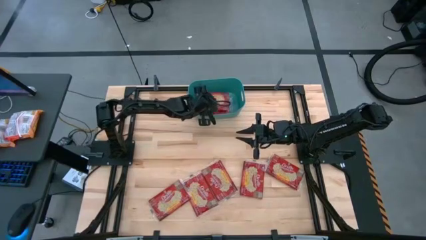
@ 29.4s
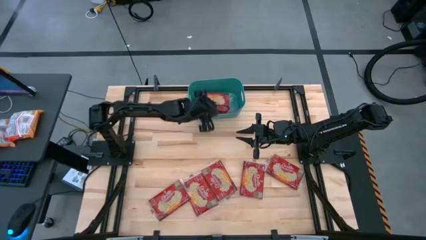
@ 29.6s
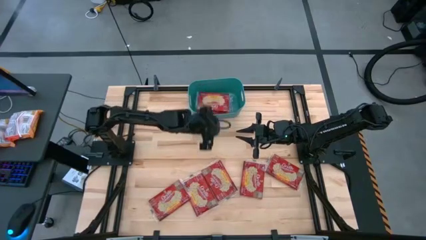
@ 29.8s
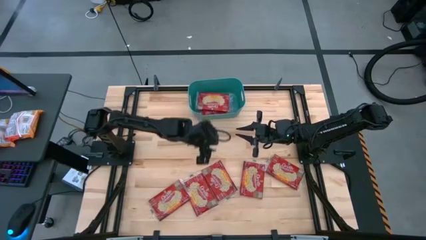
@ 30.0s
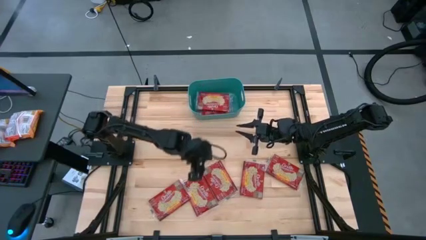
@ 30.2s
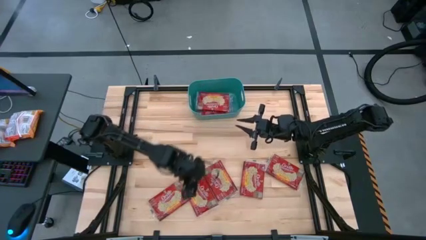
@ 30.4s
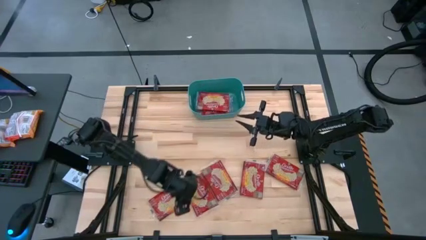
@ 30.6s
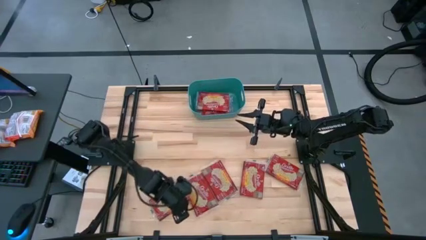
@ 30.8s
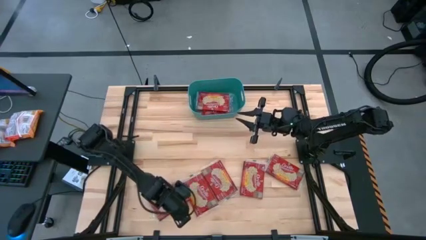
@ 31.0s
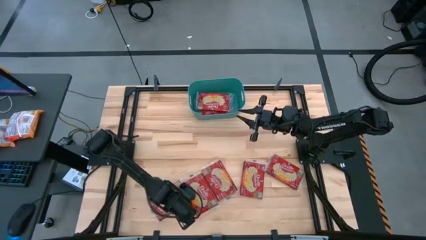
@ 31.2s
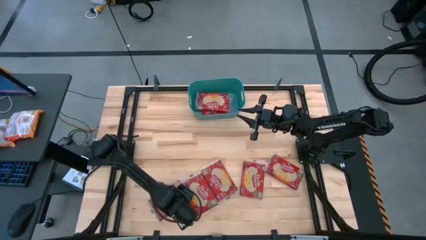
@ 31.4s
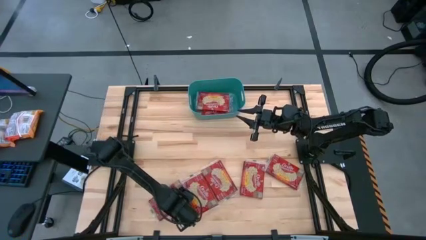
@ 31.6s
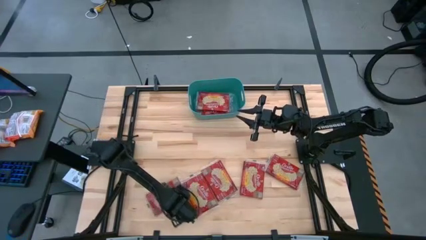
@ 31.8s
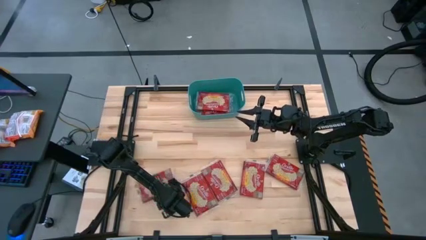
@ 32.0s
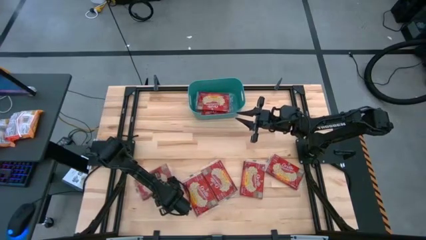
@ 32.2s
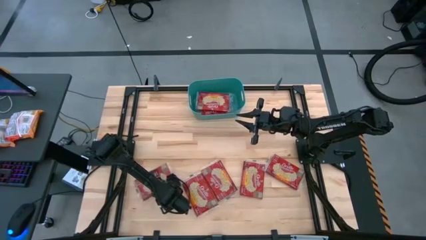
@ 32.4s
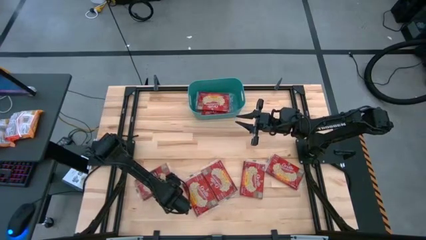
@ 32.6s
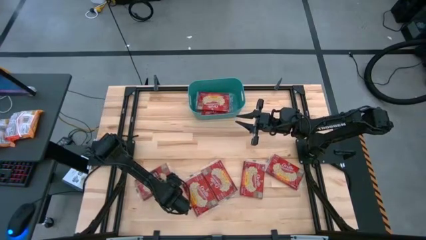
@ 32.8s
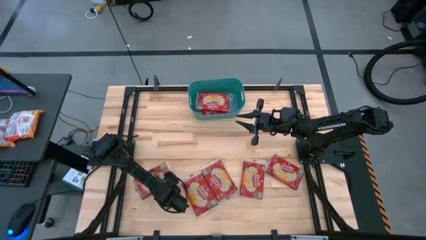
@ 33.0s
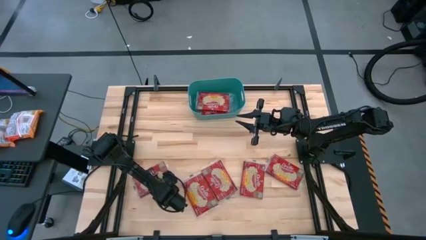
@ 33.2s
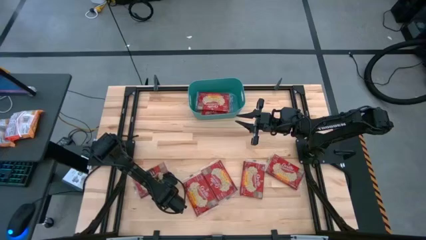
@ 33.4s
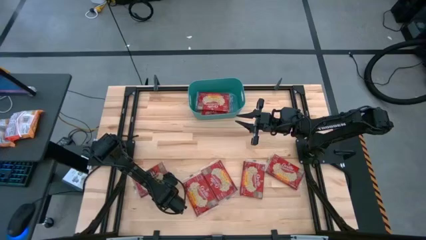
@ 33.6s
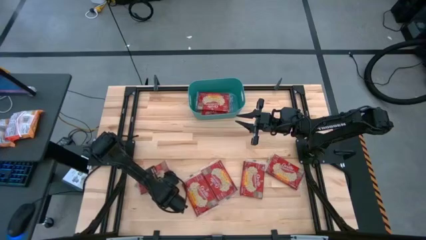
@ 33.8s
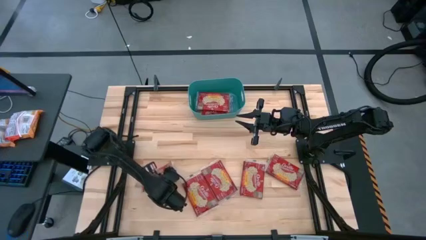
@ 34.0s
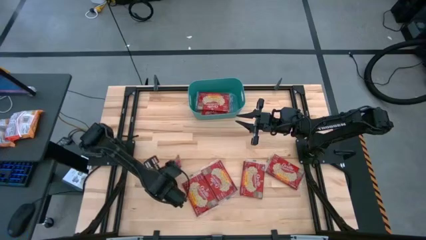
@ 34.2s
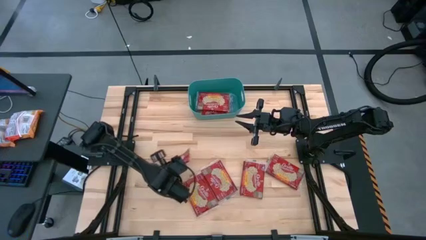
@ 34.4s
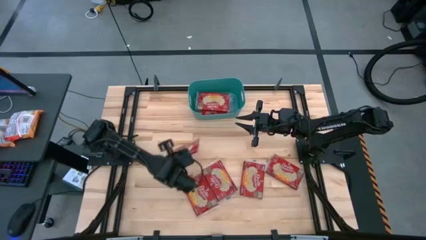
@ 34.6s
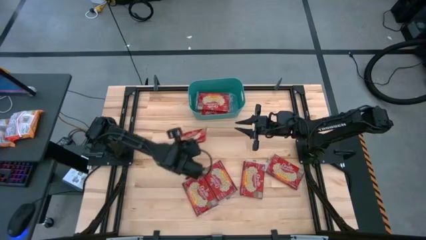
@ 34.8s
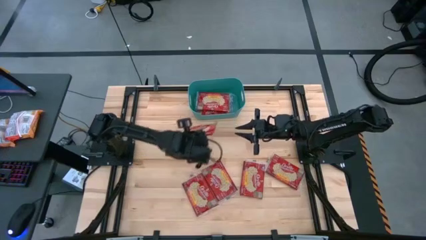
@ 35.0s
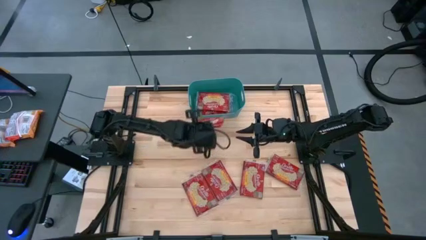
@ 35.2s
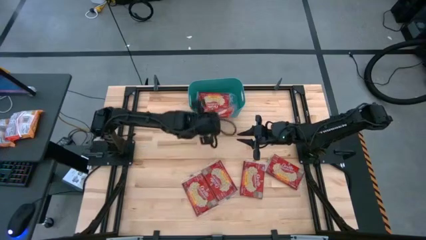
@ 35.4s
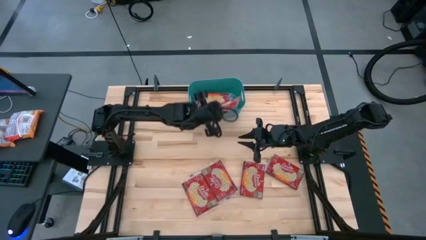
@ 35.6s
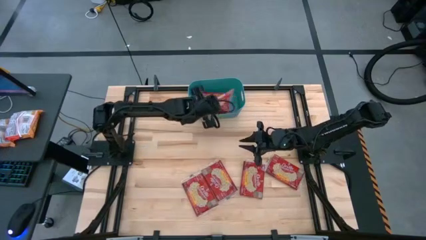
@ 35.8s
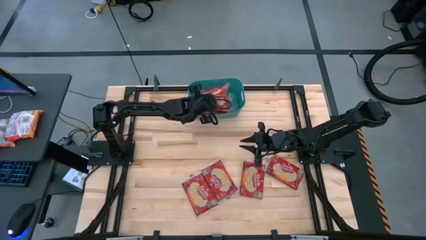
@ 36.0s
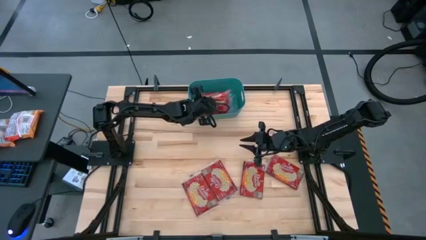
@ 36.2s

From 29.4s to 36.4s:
Task: Sort popcorn bags into baskets
Put the red popcorn bag into the bin

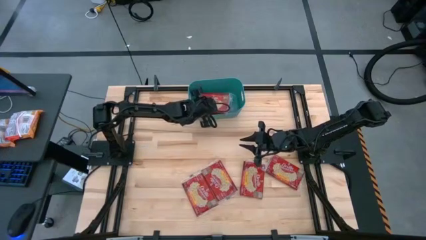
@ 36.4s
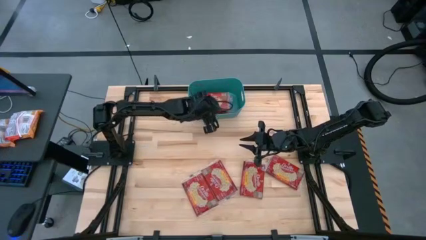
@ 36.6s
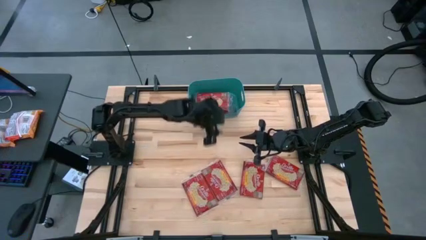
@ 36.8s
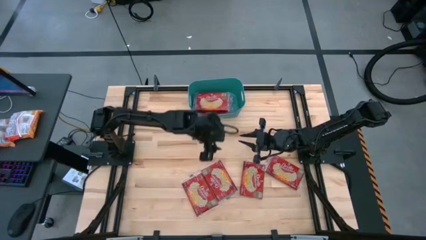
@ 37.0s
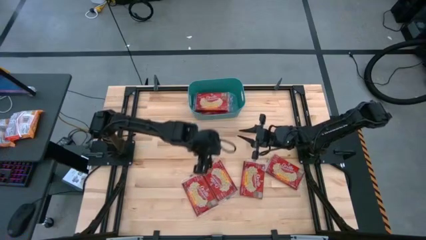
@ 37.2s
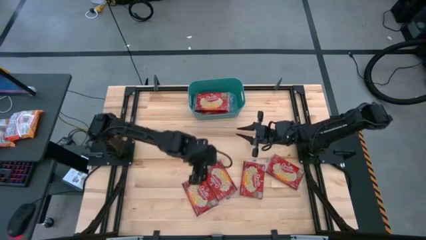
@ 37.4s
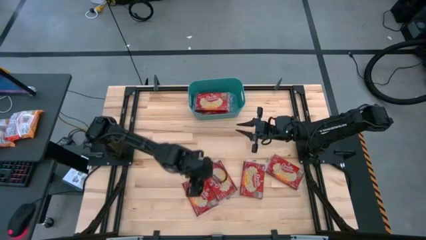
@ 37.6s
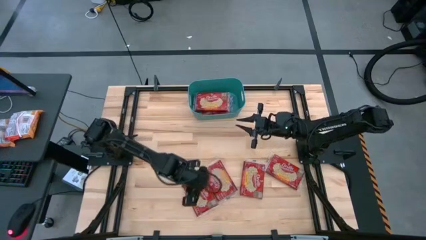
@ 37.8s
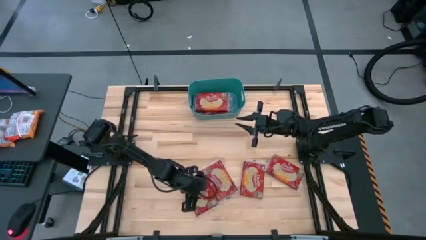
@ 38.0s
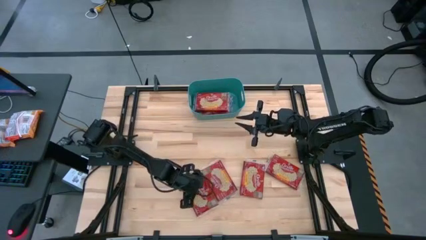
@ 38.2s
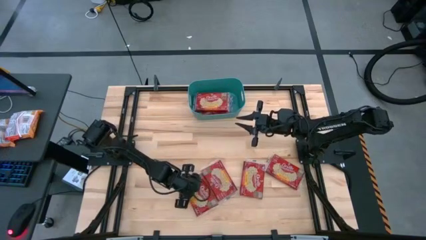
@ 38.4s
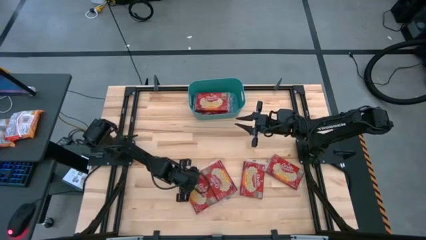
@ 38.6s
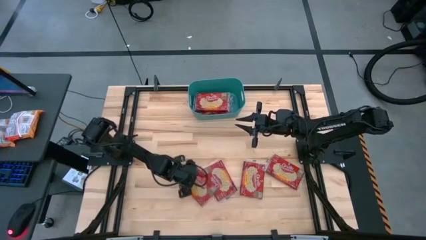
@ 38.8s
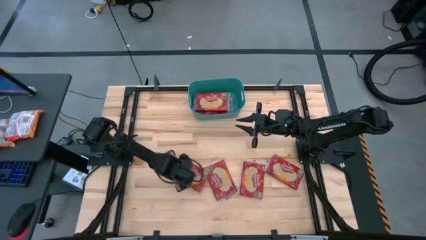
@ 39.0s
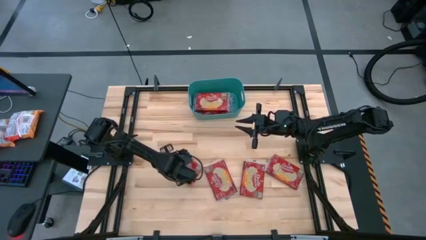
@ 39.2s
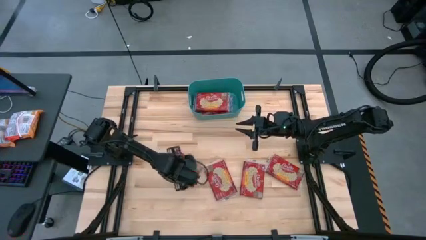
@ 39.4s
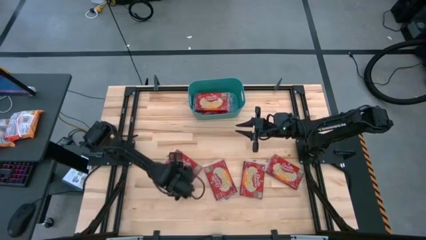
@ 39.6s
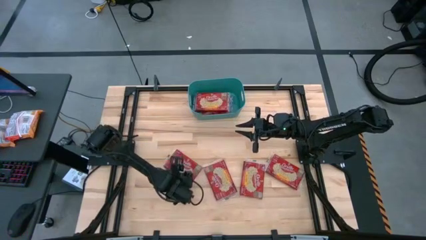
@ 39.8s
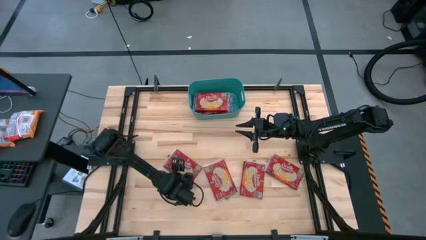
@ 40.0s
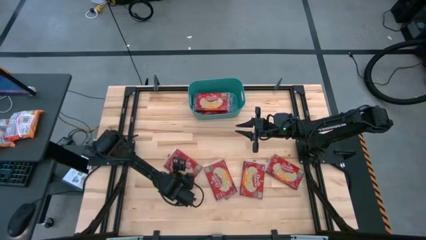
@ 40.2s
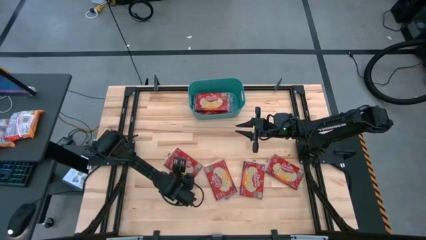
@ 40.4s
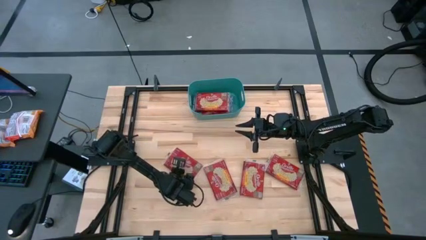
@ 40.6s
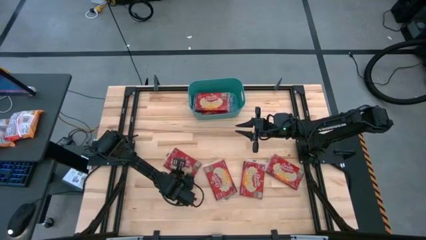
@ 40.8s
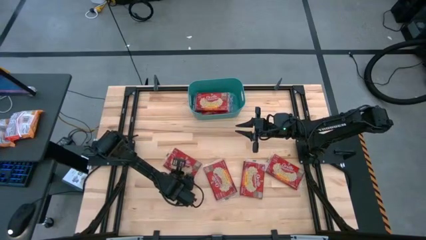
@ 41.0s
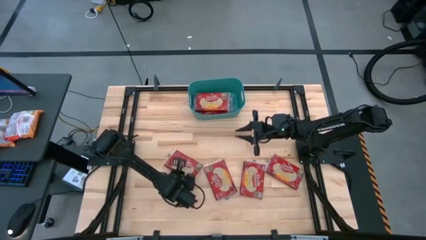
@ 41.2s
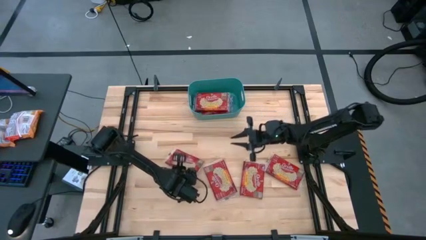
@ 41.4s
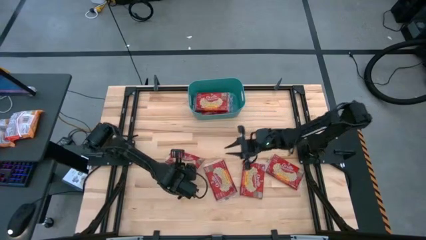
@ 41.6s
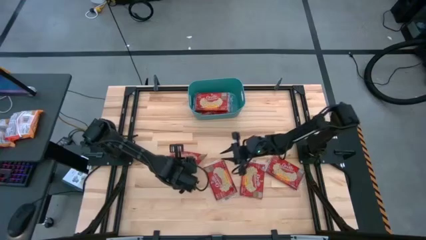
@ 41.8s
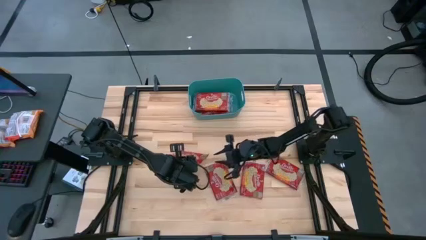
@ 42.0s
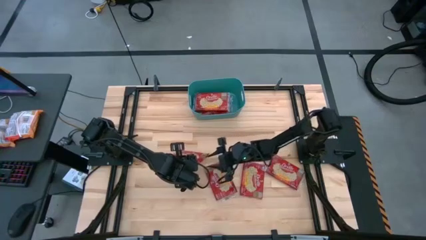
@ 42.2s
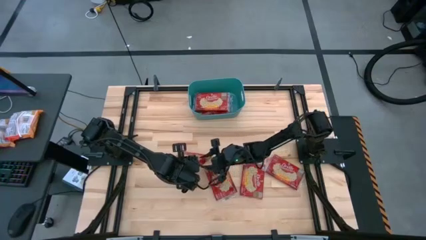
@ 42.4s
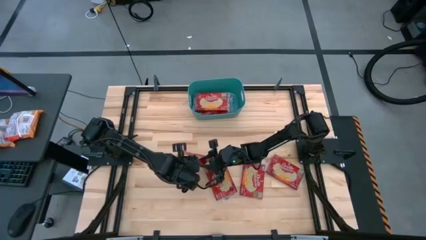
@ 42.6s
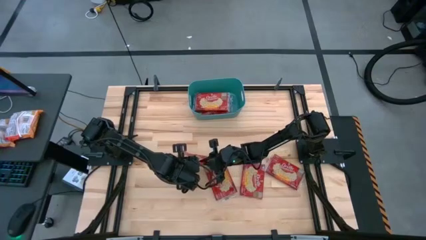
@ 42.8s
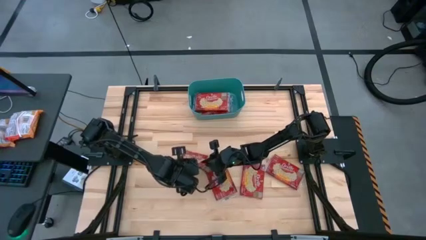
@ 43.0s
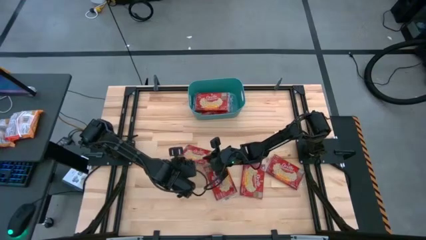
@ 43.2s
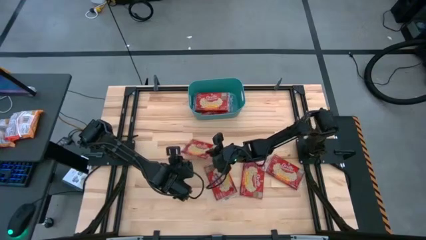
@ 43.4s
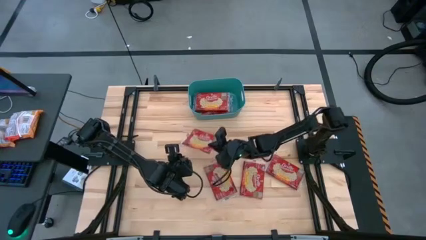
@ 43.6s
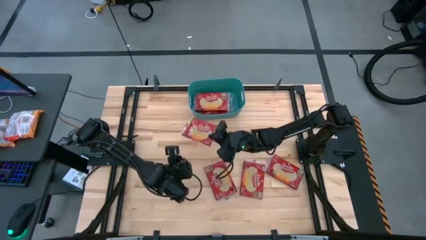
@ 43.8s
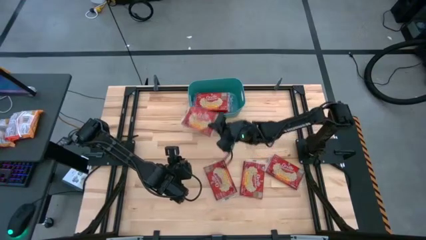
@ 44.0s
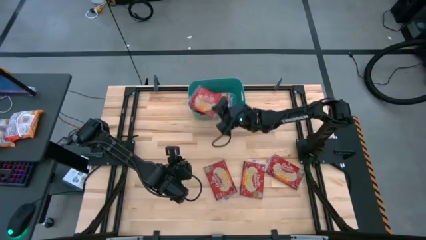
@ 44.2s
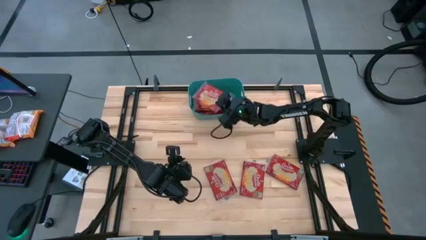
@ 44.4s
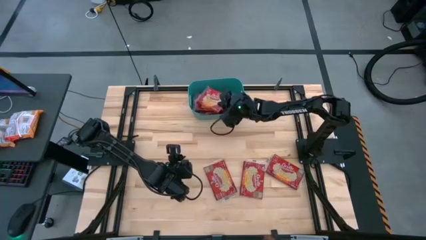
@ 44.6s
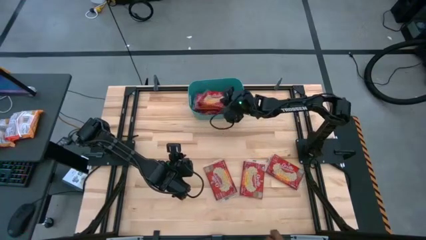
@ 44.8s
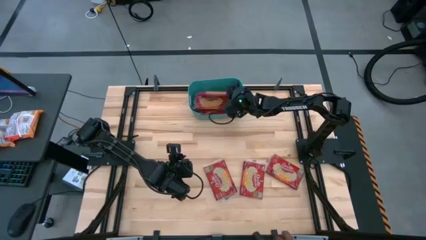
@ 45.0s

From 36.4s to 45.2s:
Put the red popcorn bag into the bin
